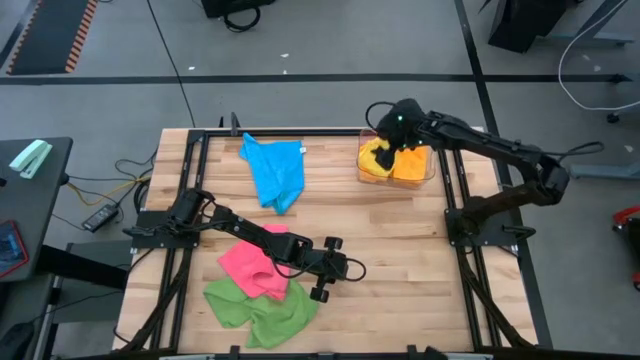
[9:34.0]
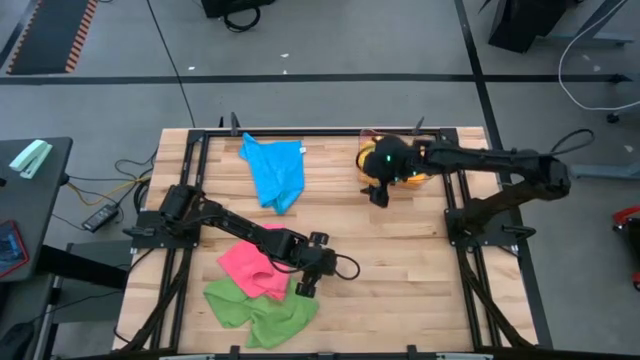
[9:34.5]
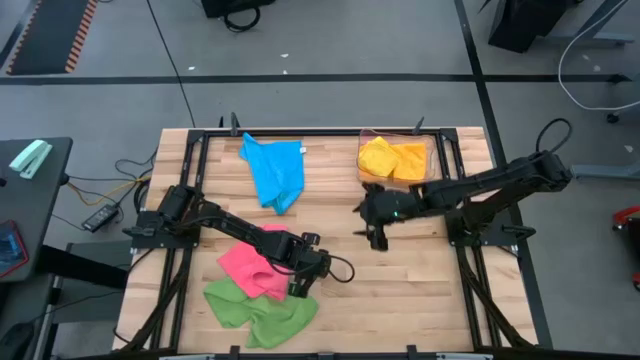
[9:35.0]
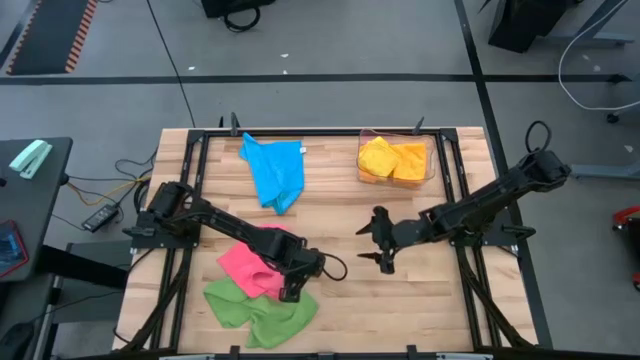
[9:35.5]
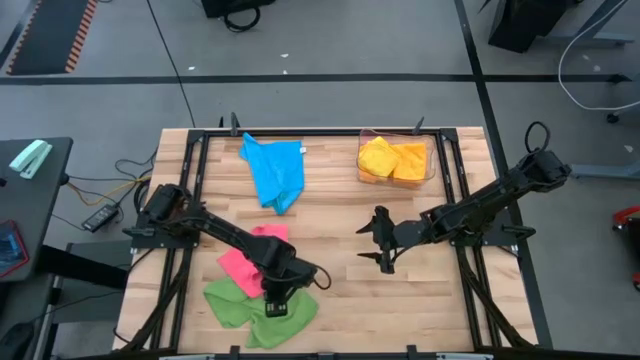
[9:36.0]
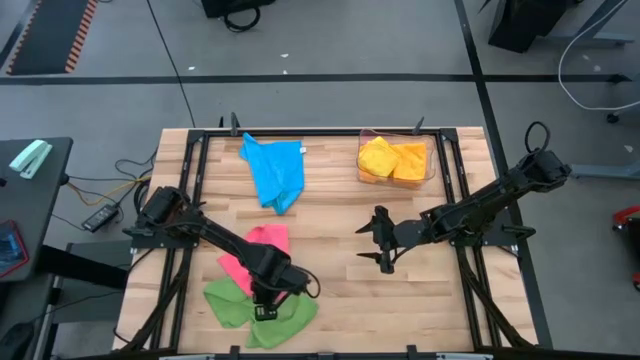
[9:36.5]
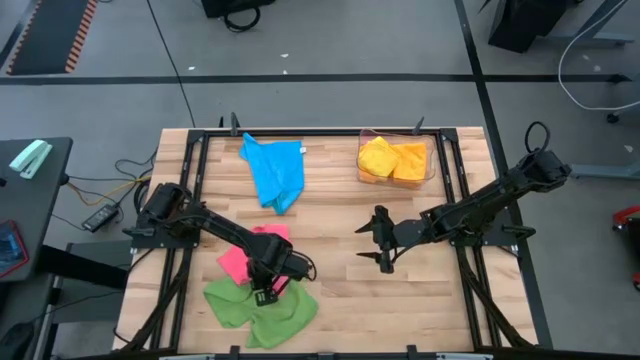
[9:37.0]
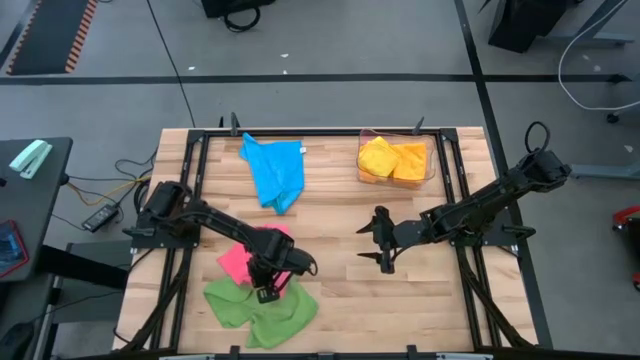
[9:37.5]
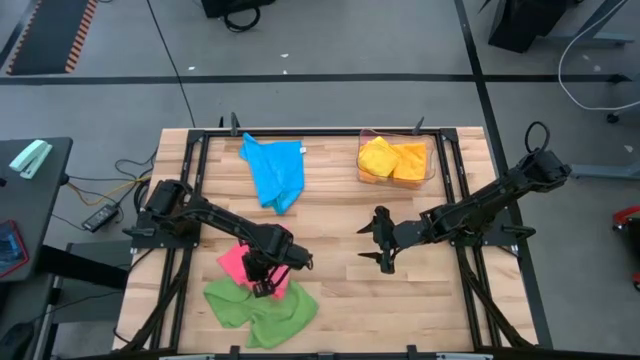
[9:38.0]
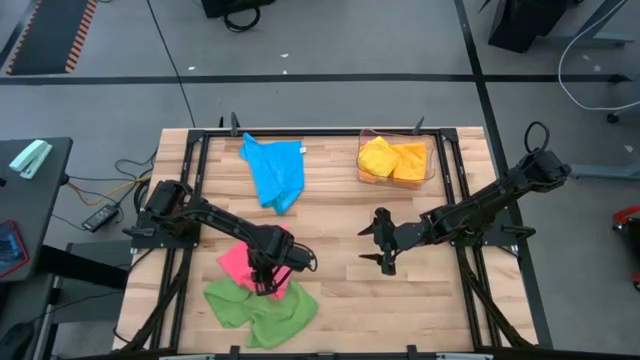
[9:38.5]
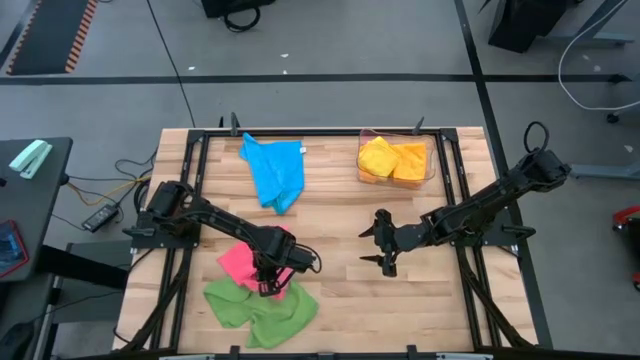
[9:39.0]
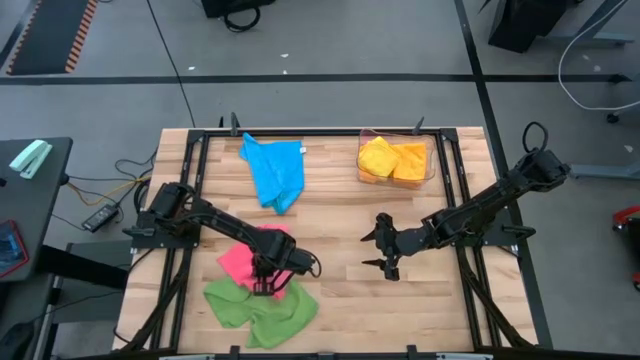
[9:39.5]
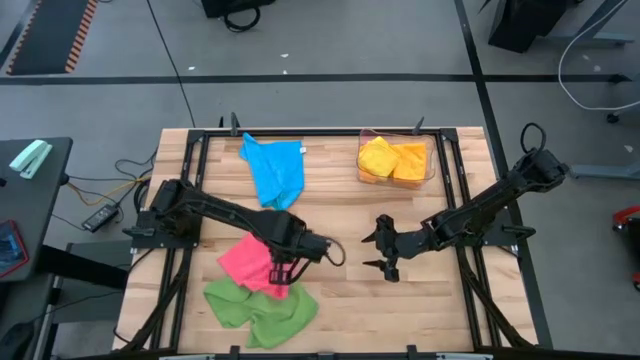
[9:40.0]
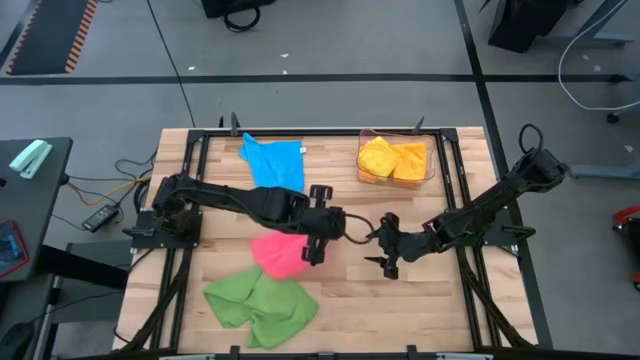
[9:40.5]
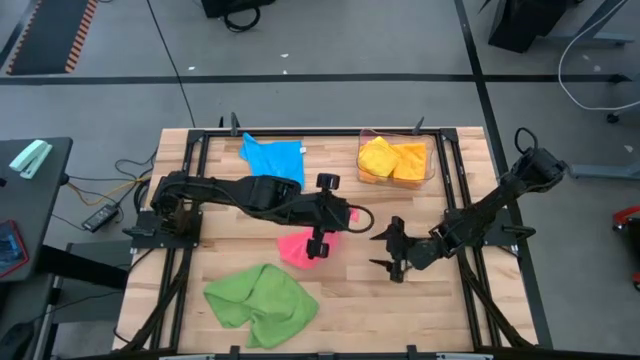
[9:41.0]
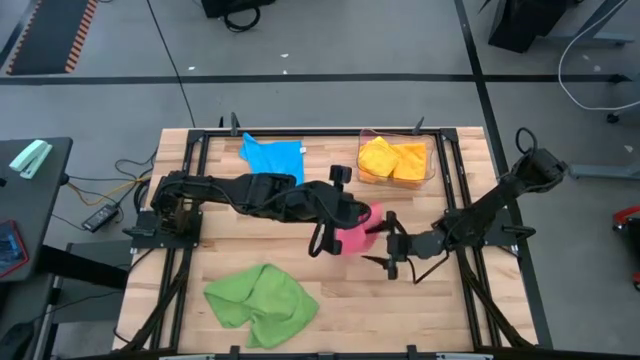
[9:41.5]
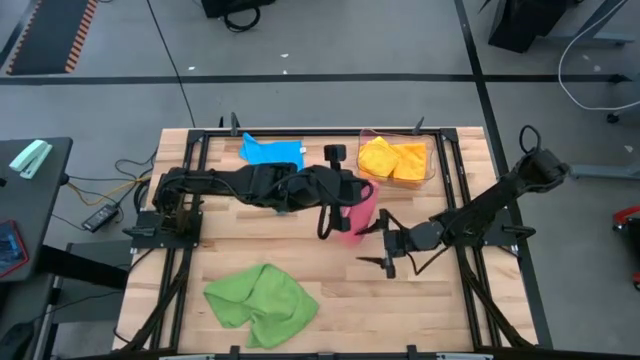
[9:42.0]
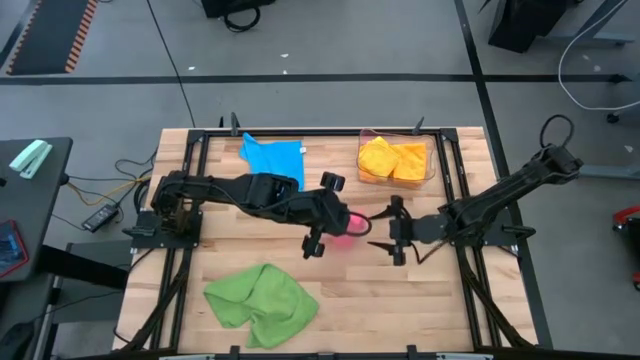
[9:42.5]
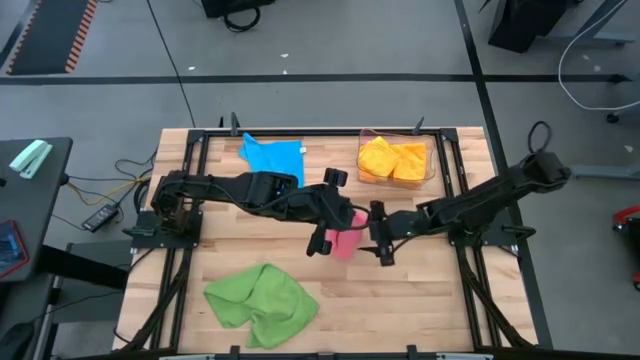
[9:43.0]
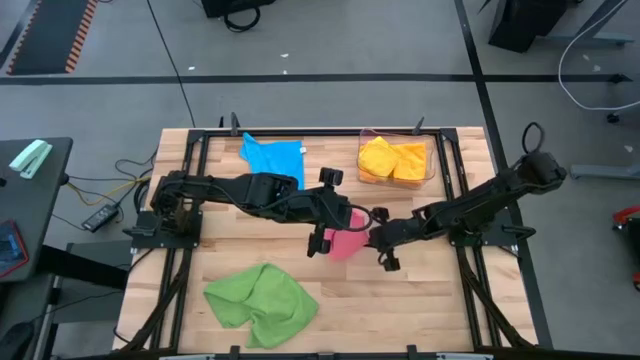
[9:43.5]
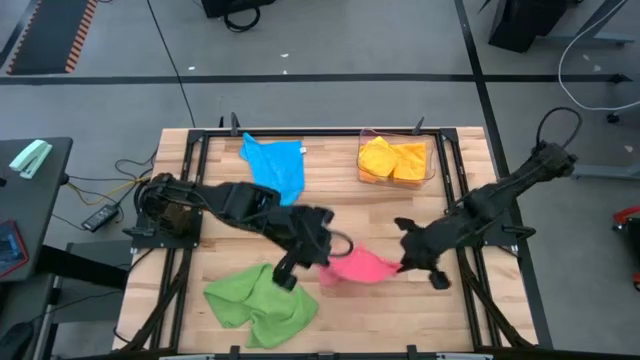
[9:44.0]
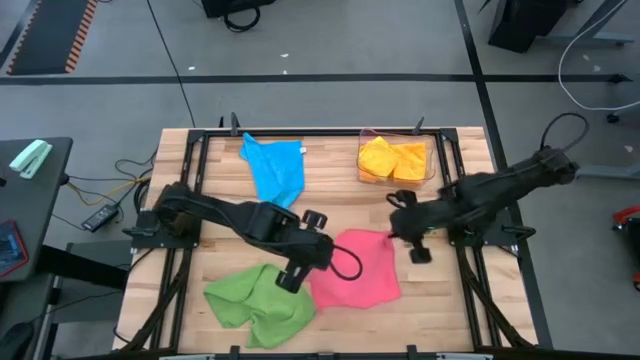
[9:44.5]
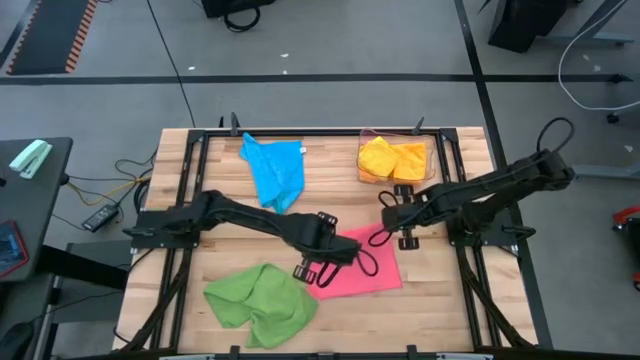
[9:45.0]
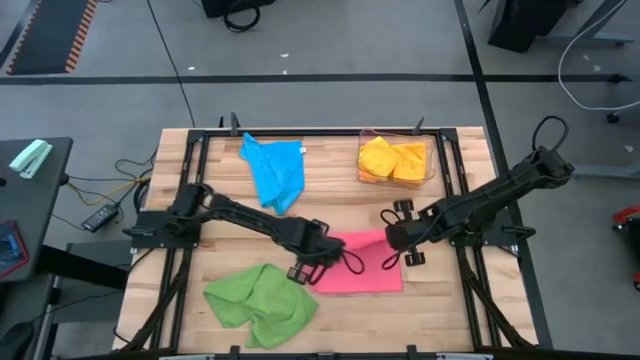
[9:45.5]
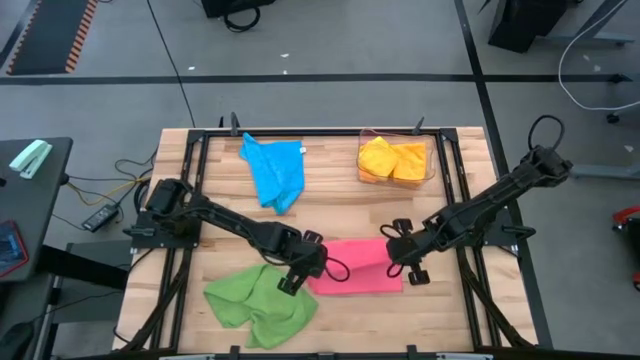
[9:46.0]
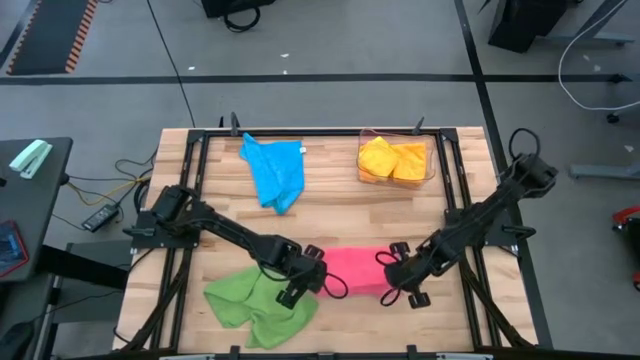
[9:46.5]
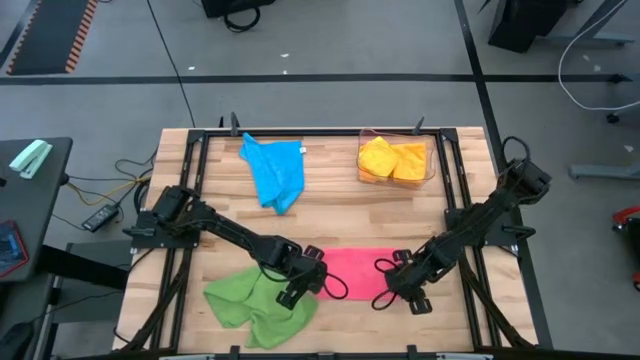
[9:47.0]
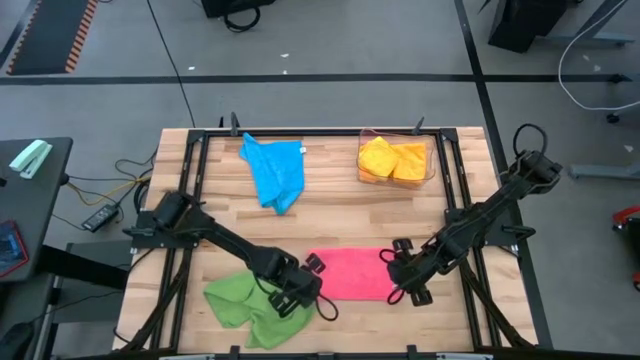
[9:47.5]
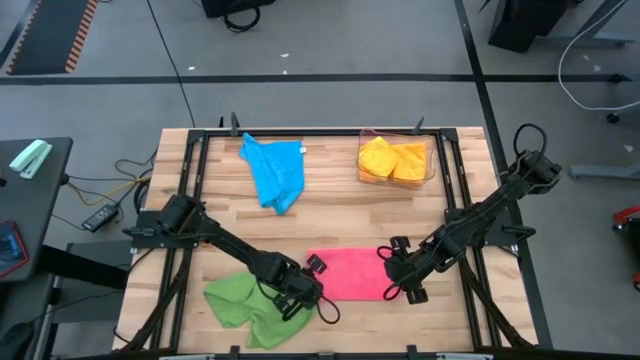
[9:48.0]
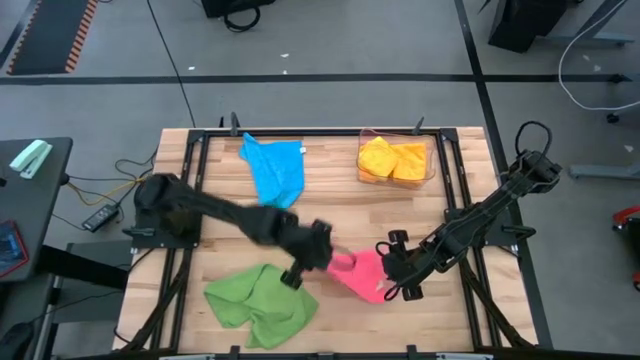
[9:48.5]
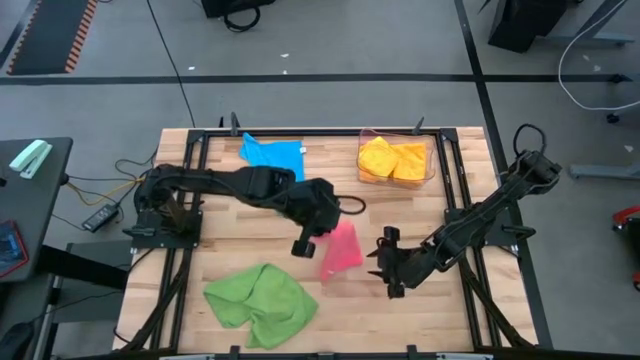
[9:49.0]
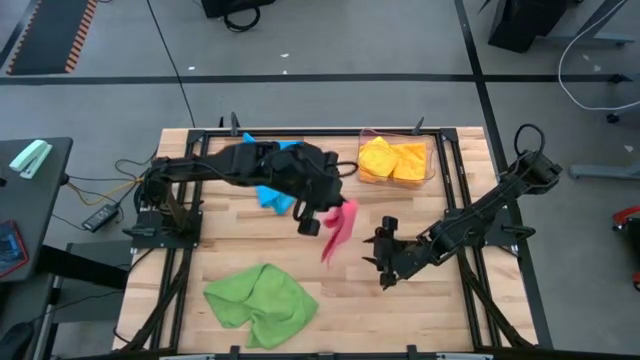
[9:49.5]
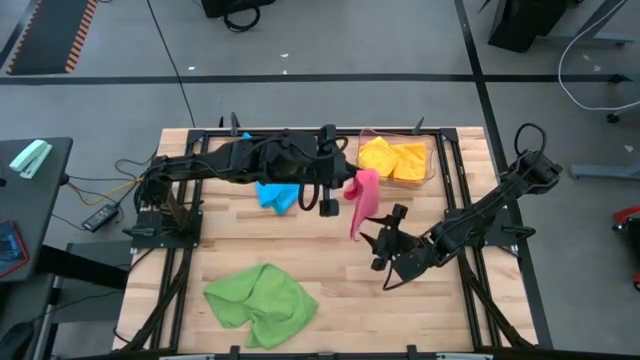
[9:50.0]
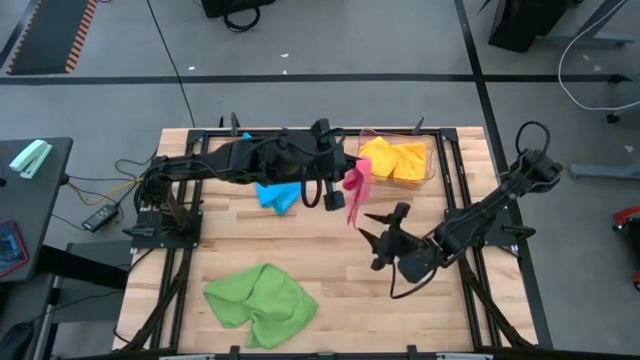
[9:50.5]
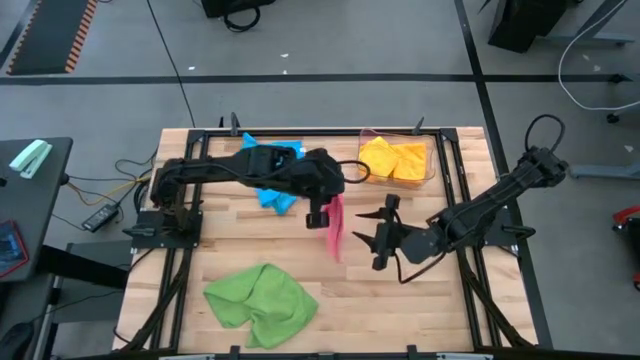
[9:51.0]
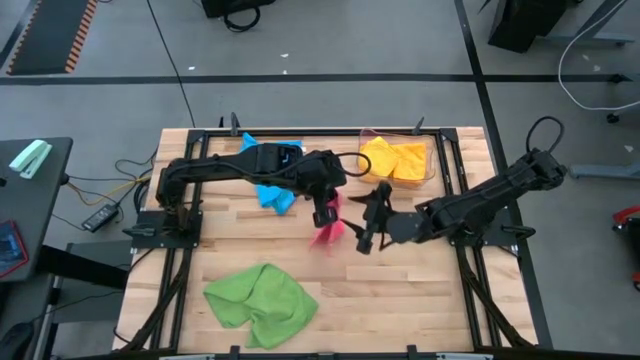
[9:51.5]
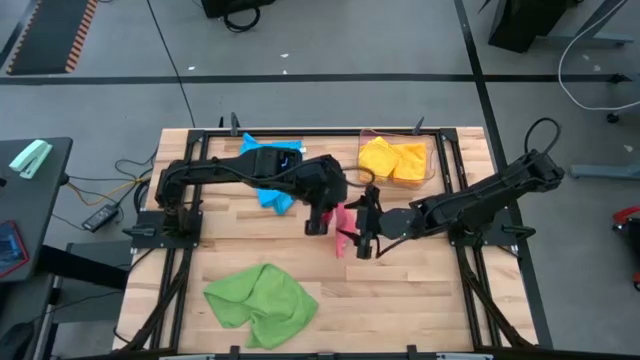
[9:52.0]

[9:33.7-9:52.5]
Task: Fold microfiber towels
Fold the pink microfiber cloth
